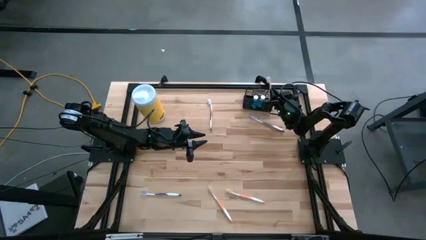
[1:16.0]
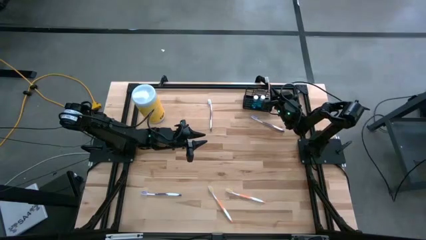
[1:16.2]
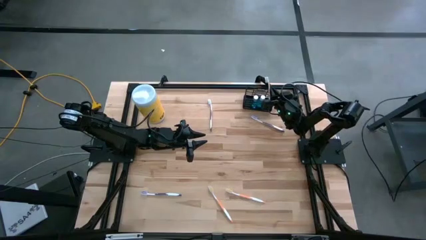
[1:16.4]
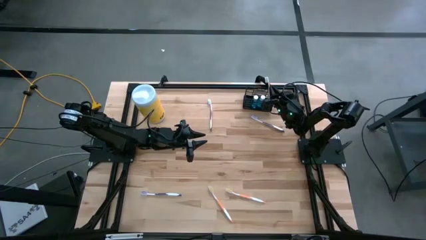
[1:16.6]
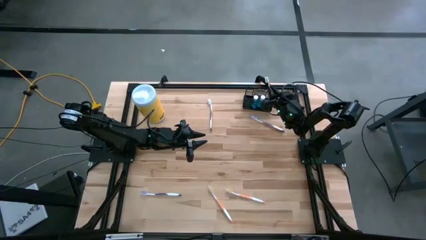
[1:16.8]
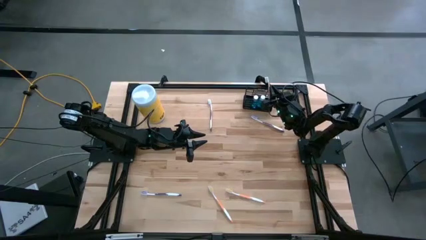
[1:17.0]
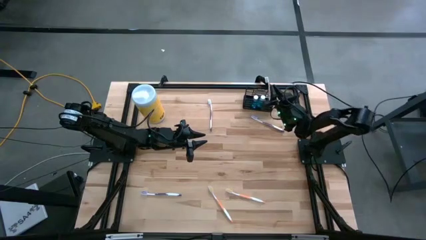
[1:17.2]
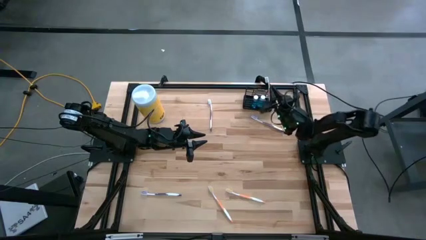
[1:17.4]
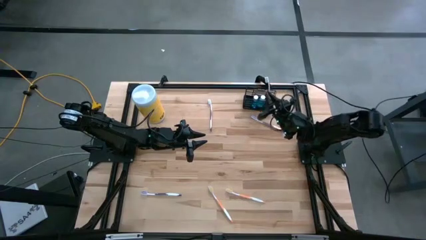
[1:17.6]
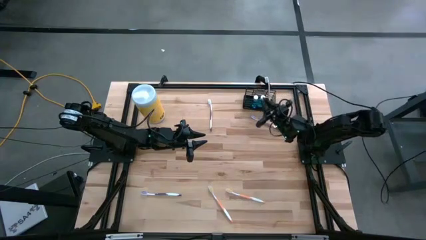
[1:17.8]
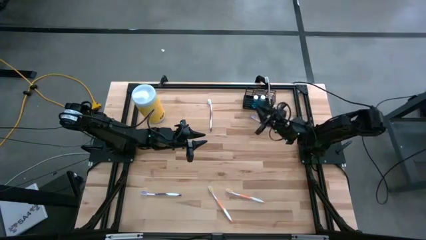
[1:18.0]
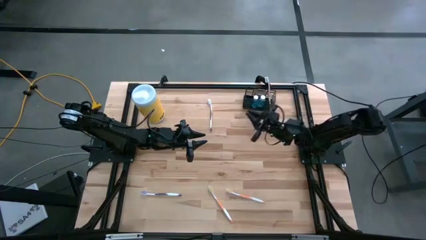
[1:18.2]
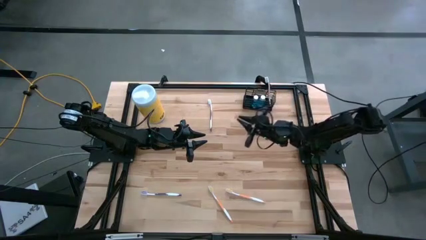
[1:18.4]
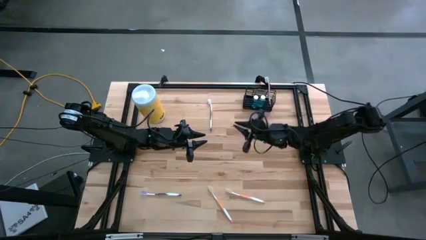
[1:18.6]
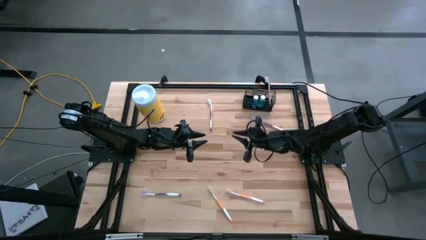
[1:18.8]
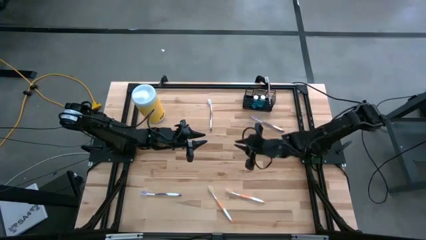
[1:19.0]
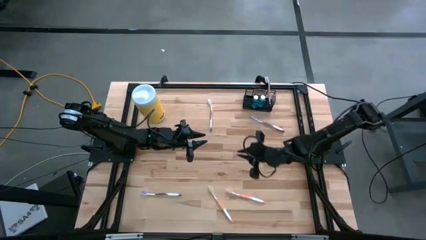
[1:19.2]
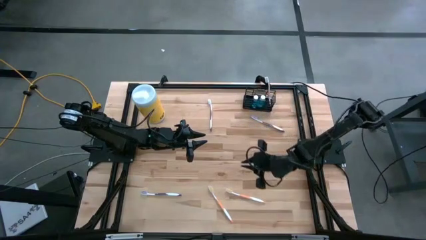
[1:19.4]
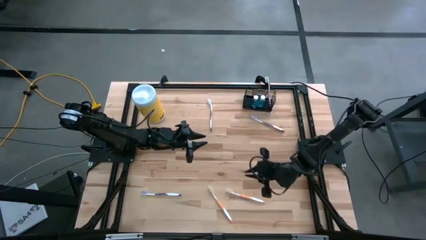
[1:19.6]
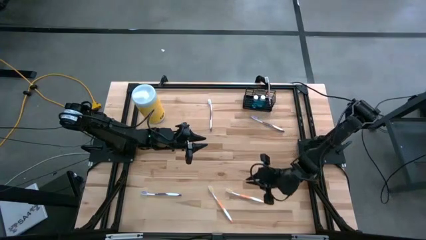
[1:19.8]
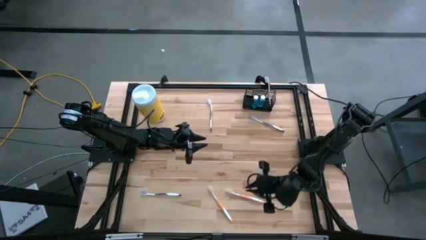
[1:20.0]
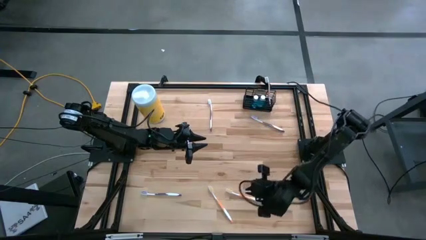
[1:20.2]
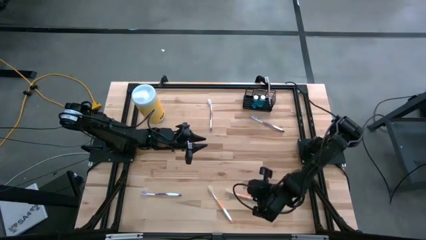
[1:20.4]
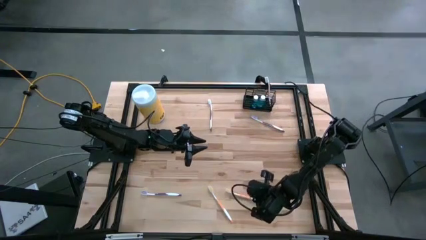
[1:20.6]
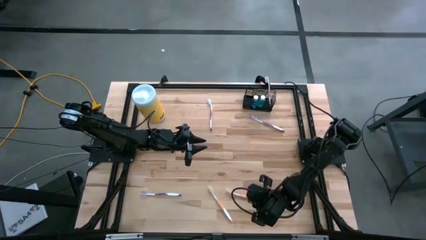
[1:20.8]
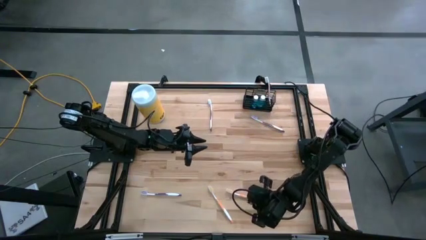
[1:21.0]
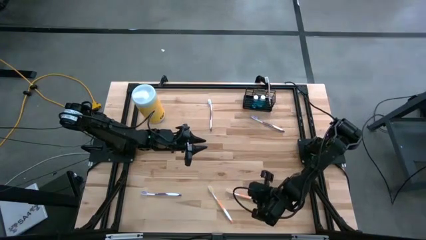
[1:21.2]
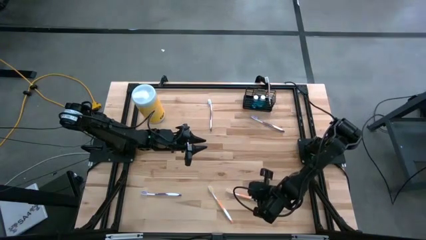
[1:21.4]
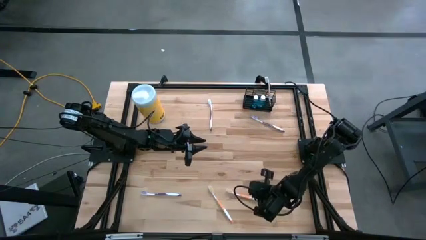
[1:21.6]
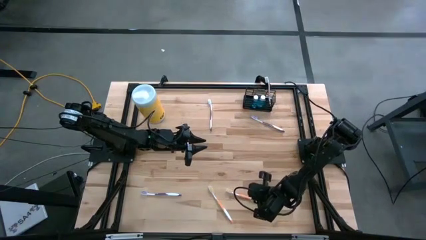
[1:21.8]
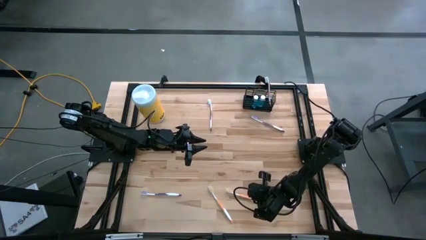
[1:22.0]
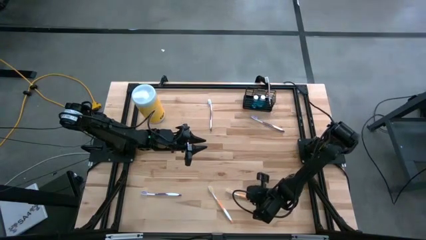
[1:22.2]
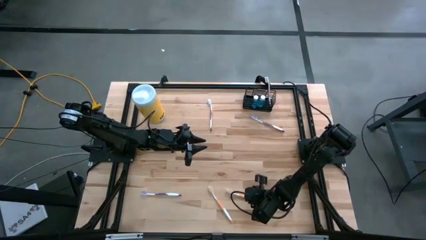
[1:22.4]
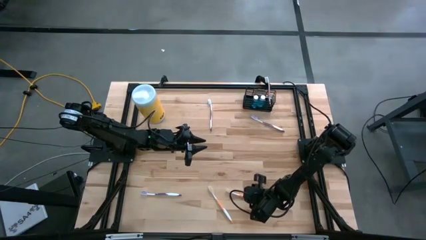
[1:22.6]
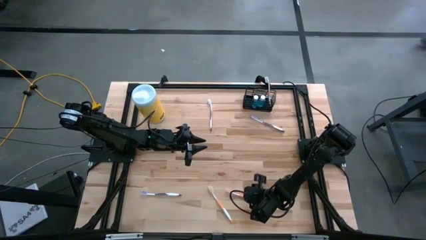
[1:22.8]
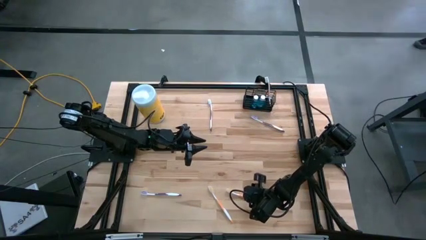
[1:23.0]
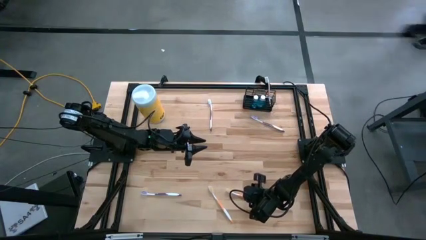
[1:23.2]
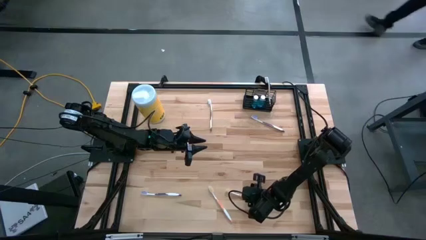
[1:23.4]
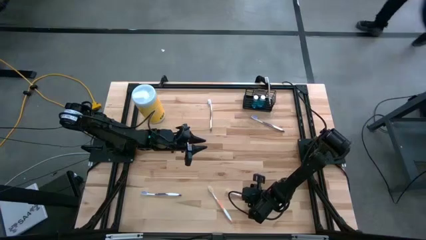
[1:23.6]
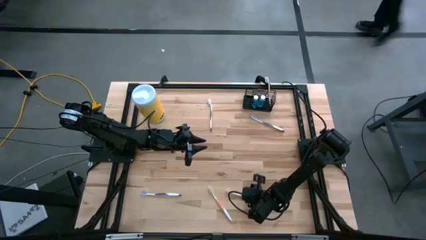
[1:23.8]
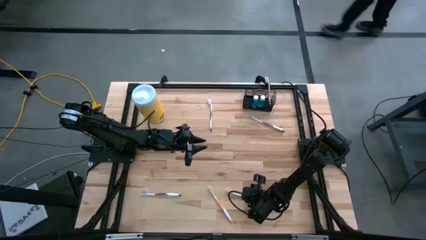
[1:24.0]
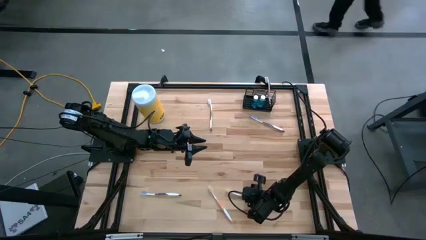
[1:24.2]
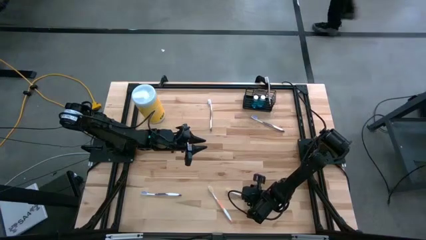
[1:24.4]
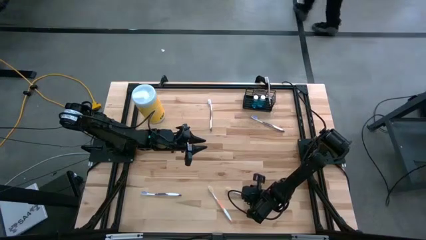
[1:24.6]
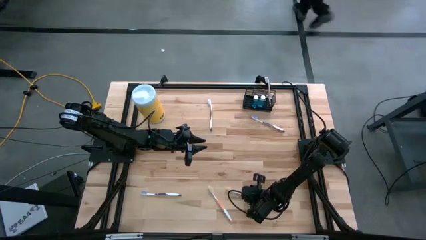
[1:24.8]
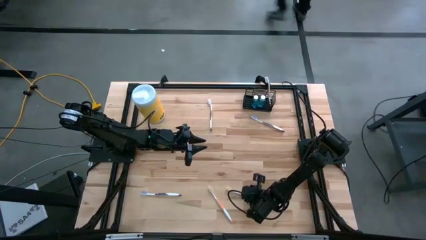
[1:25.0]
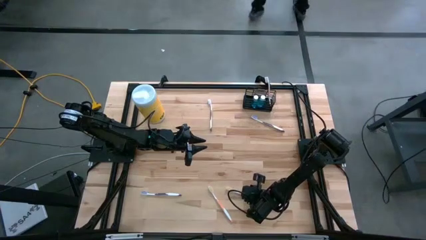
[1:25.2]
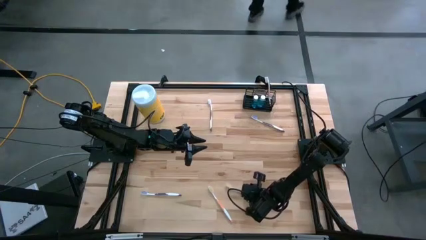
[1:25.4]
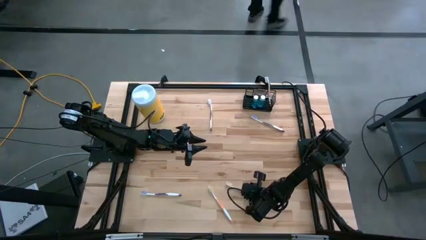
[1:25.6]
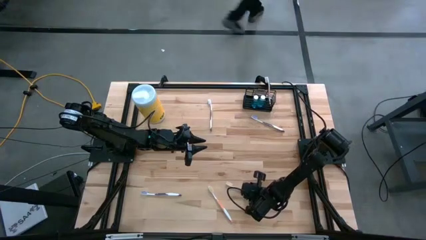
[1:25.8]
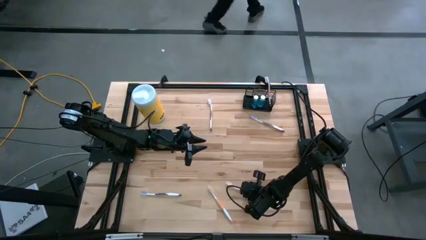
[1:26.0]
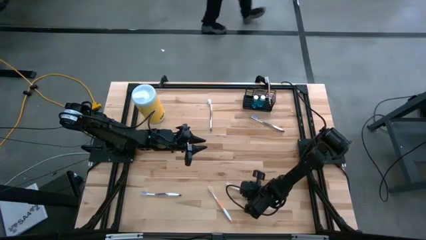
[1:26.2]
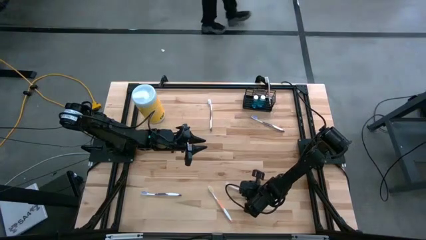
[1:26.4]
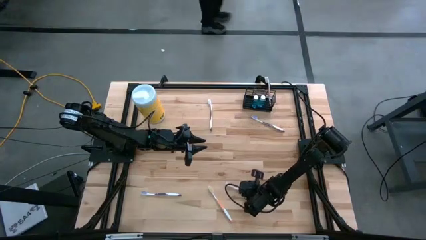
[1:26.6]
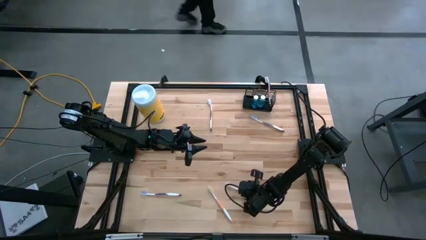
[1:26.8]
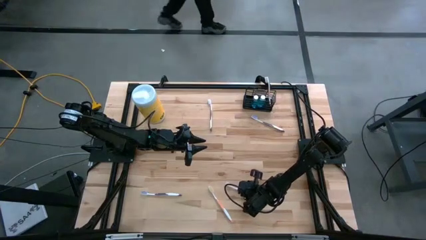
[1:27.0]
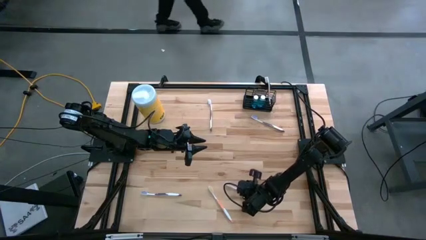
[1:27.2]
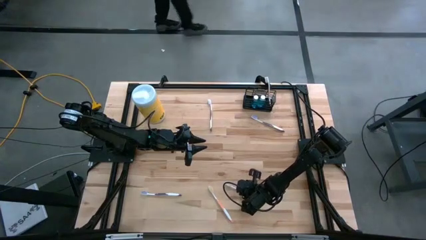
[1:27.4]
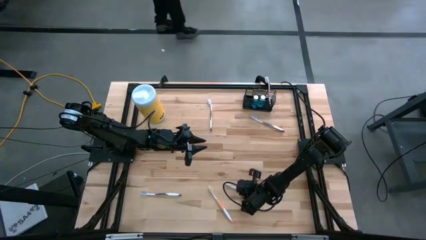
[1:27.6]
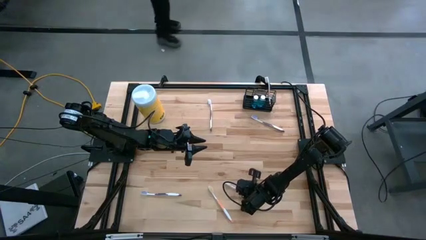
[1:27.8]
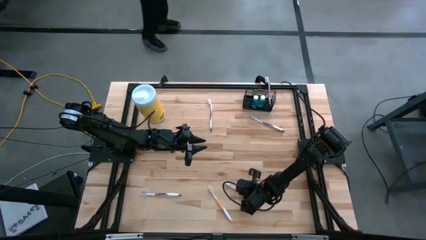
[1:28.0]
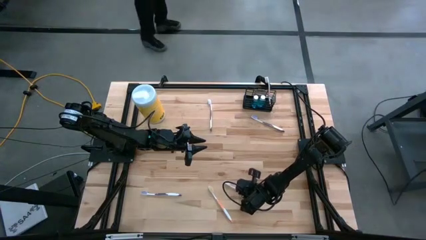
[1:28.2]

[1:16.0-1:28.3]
Task: Pick & Place toothbrushing station
Put the right orange toothbrush into the black wire organizer
